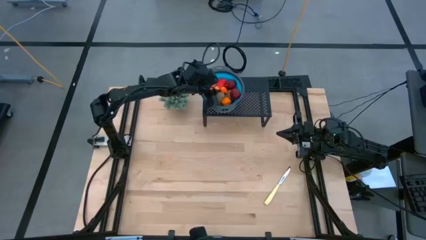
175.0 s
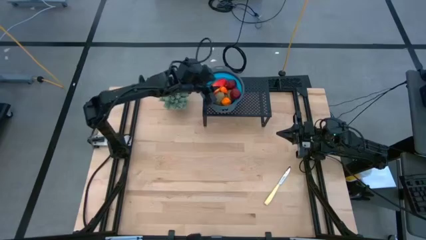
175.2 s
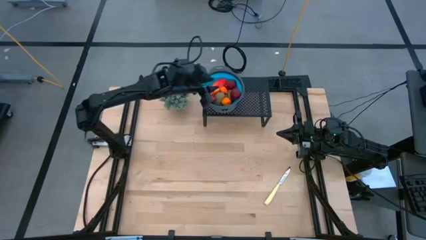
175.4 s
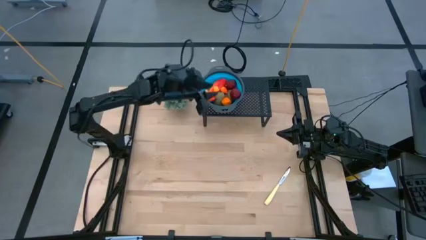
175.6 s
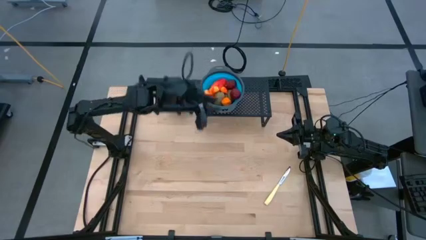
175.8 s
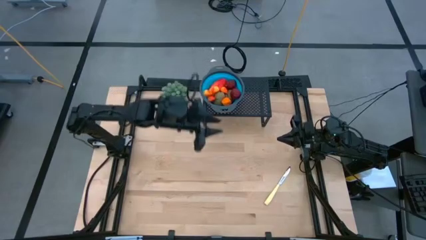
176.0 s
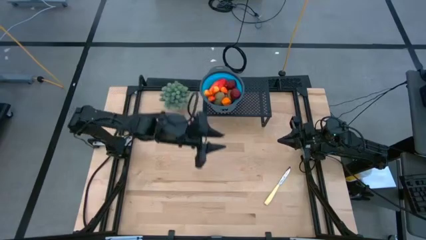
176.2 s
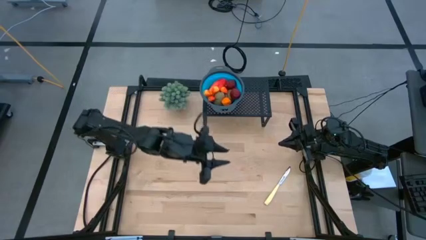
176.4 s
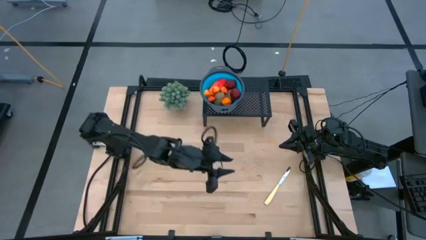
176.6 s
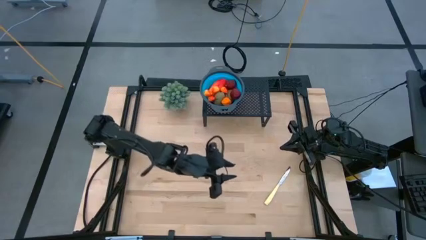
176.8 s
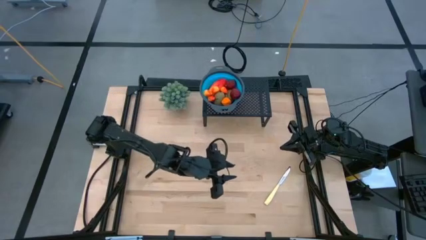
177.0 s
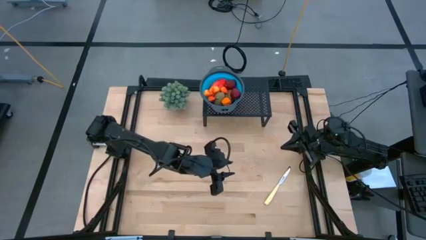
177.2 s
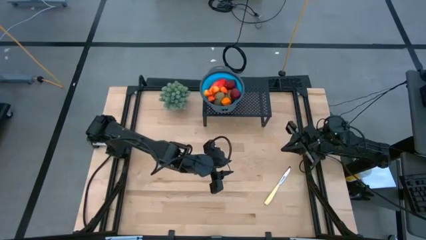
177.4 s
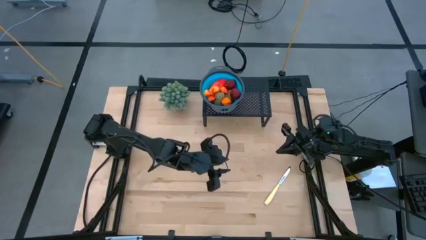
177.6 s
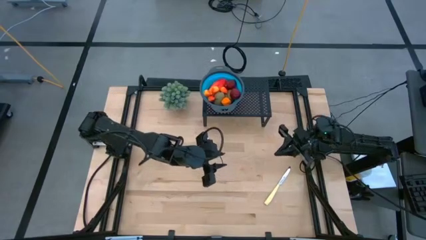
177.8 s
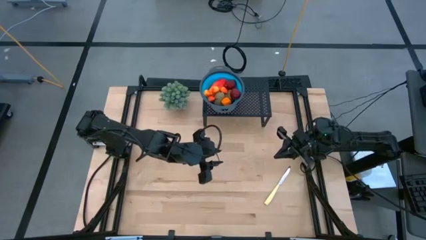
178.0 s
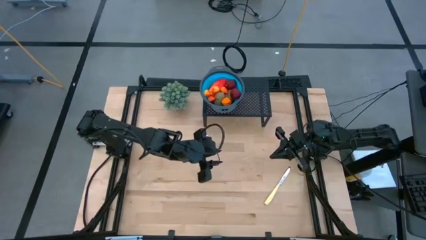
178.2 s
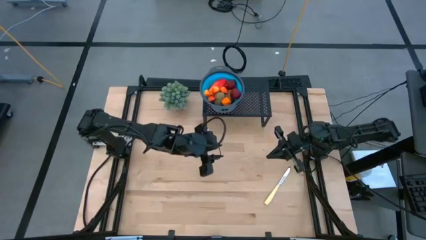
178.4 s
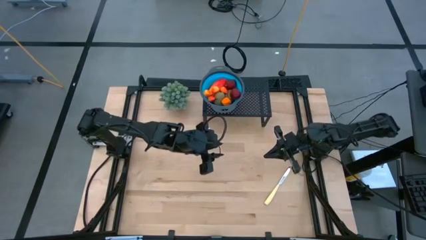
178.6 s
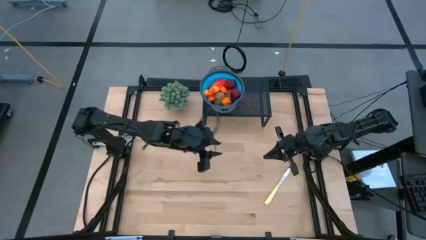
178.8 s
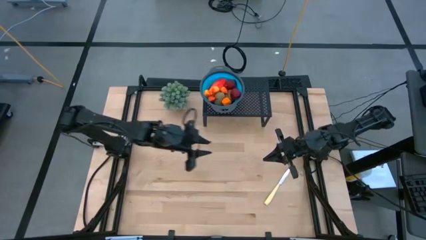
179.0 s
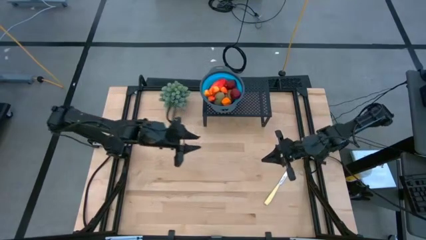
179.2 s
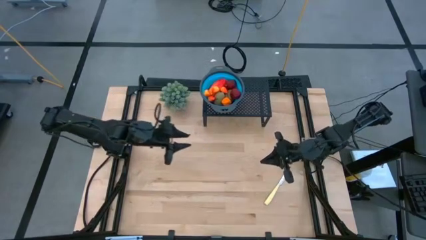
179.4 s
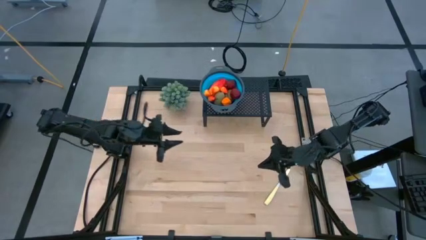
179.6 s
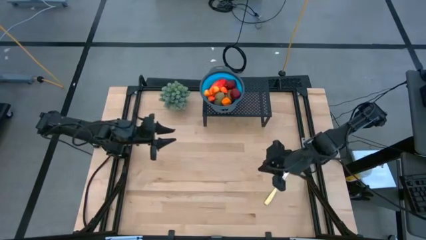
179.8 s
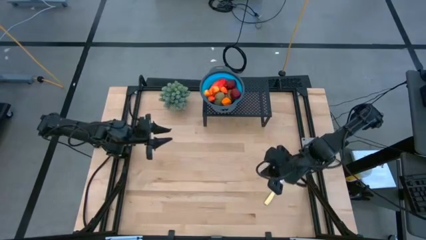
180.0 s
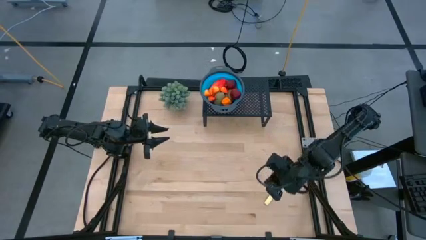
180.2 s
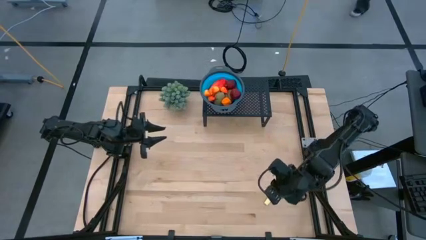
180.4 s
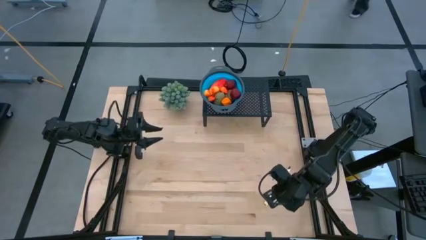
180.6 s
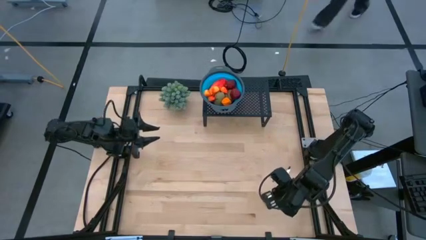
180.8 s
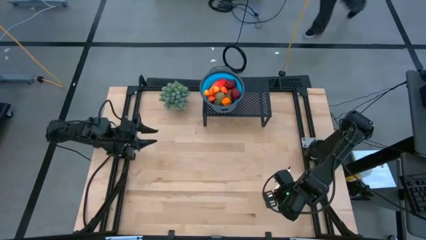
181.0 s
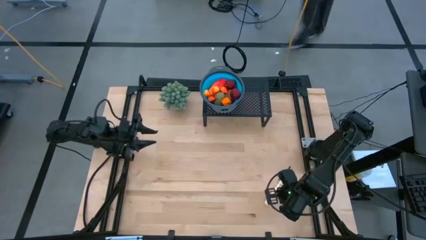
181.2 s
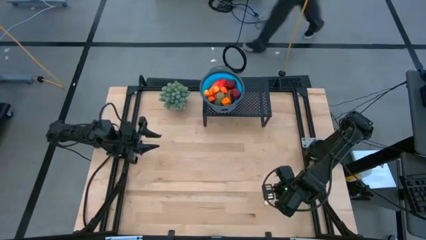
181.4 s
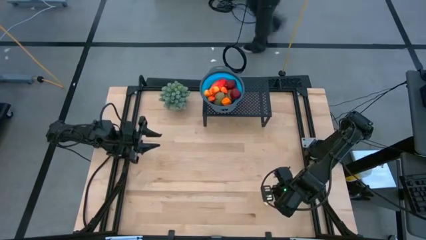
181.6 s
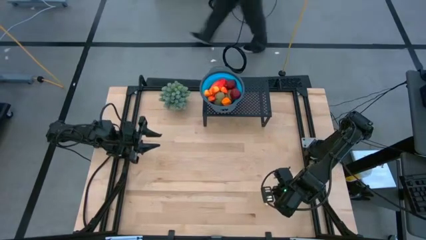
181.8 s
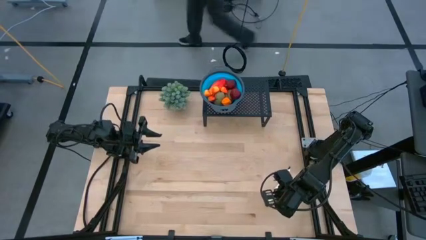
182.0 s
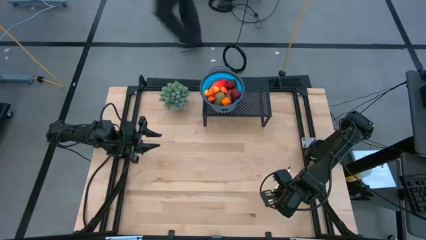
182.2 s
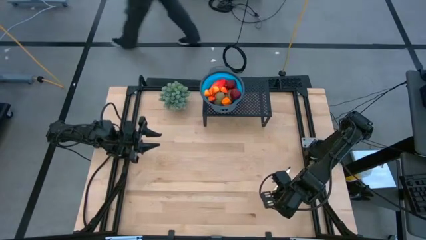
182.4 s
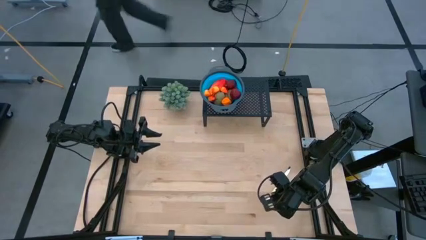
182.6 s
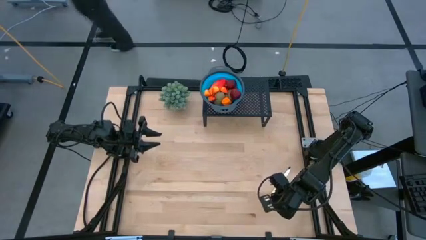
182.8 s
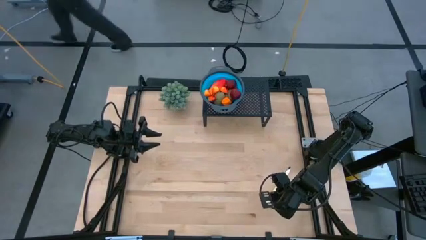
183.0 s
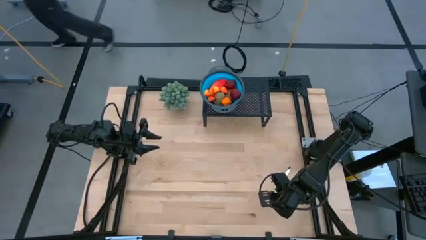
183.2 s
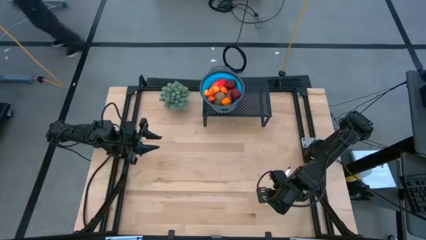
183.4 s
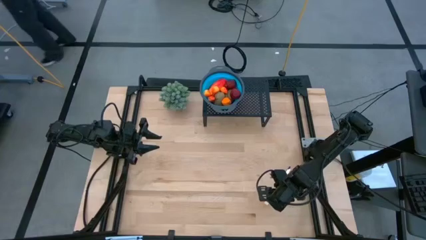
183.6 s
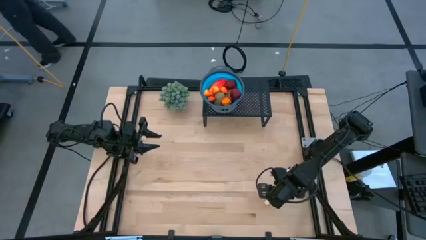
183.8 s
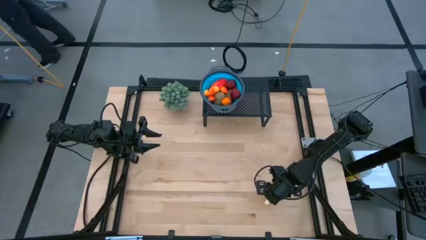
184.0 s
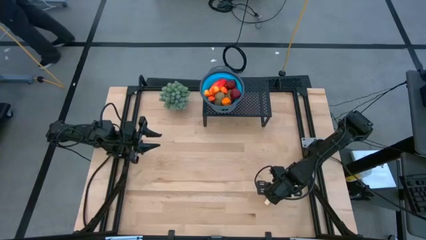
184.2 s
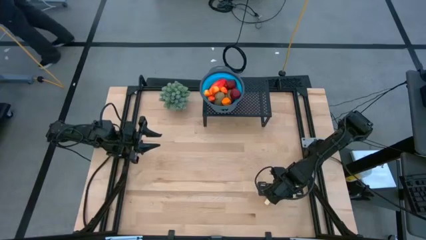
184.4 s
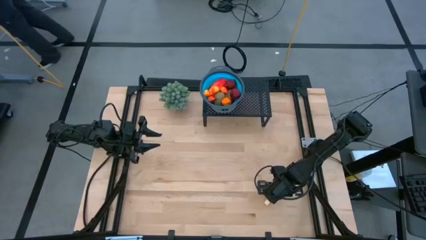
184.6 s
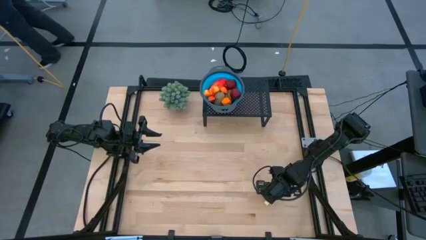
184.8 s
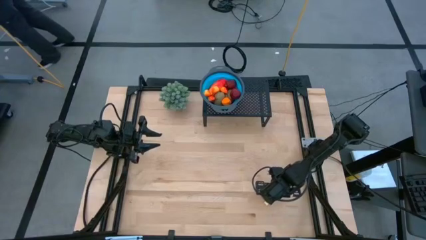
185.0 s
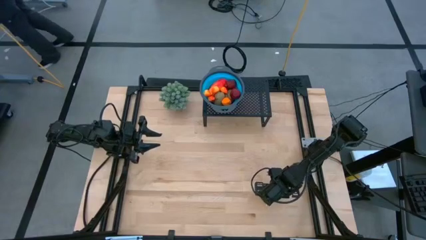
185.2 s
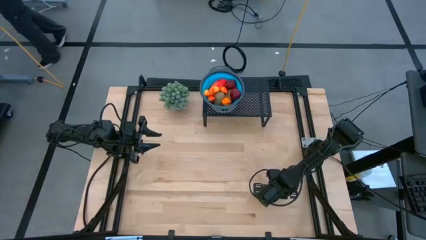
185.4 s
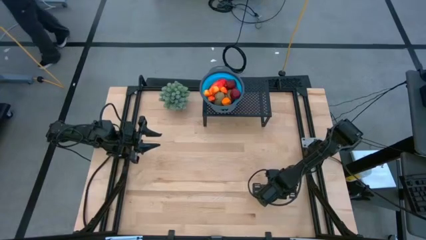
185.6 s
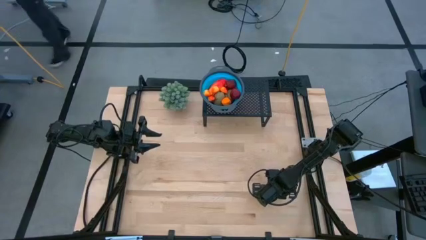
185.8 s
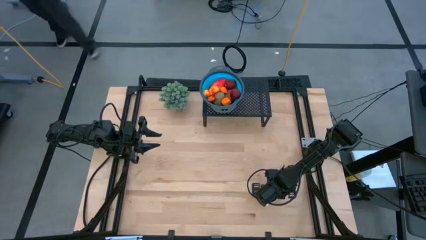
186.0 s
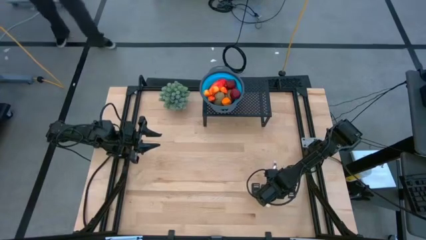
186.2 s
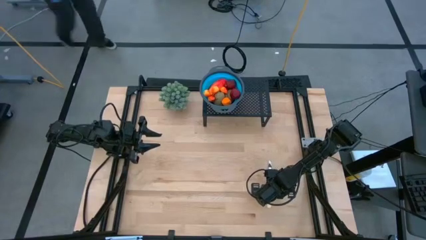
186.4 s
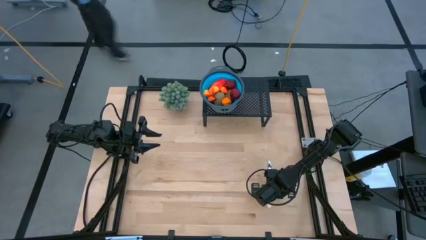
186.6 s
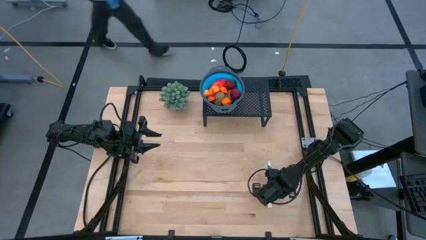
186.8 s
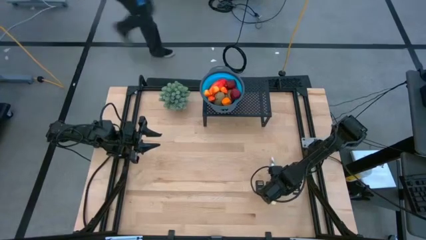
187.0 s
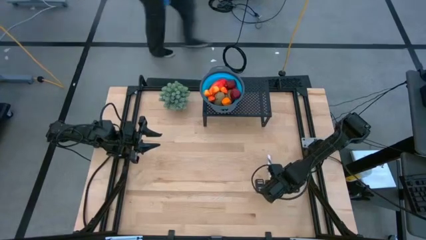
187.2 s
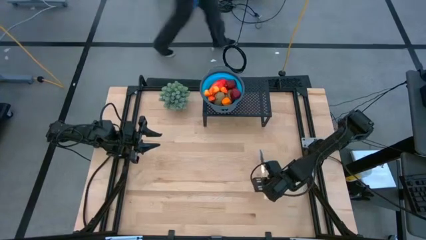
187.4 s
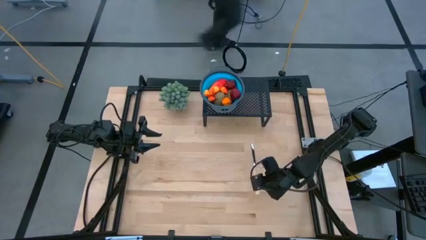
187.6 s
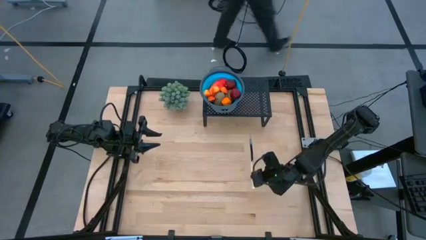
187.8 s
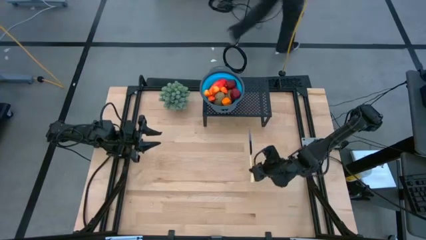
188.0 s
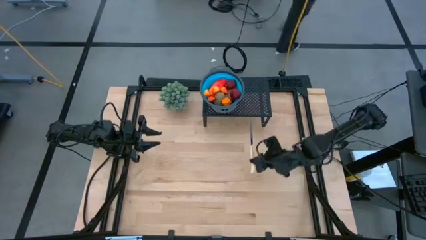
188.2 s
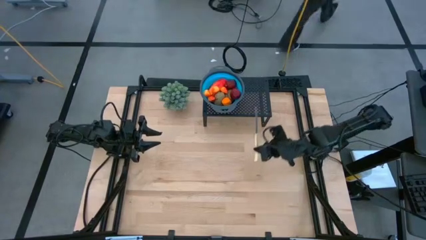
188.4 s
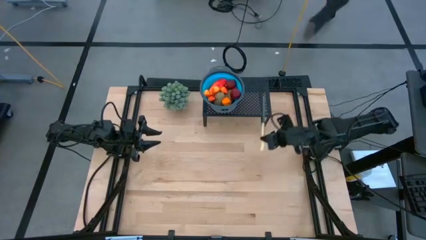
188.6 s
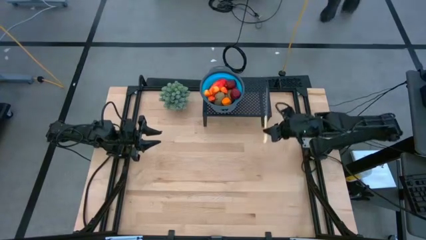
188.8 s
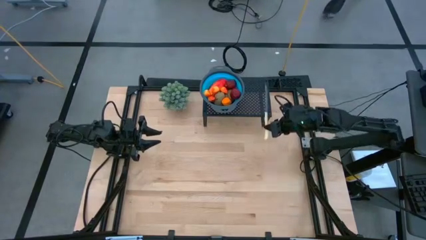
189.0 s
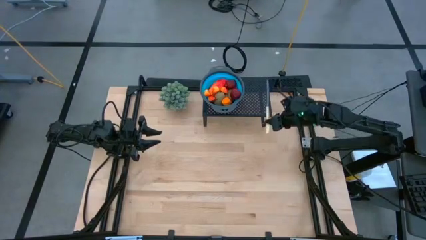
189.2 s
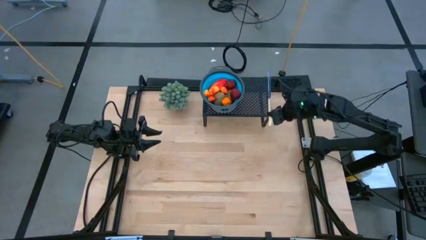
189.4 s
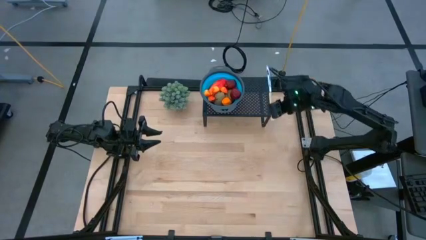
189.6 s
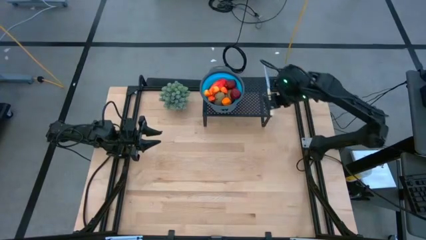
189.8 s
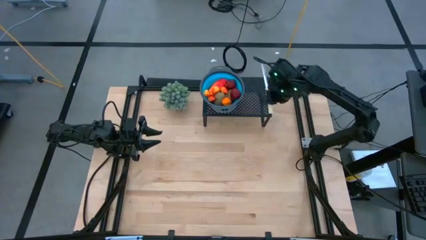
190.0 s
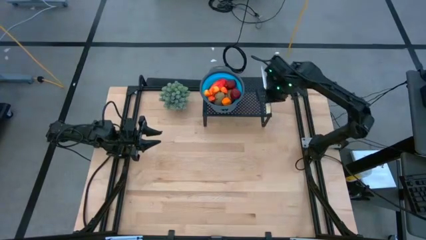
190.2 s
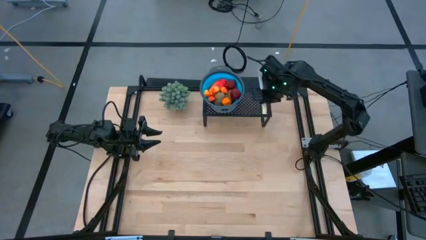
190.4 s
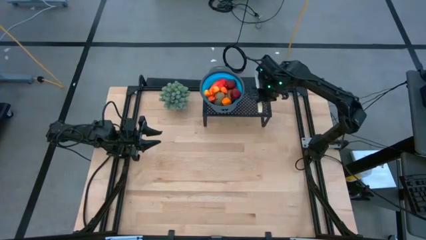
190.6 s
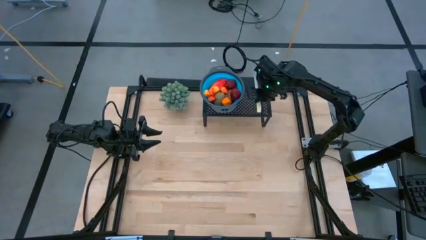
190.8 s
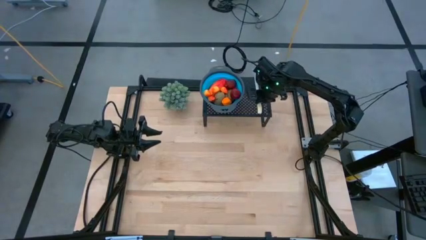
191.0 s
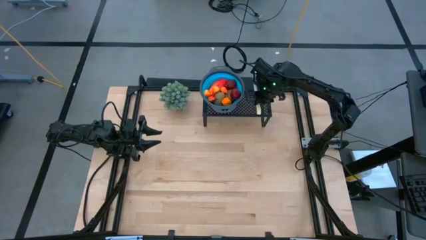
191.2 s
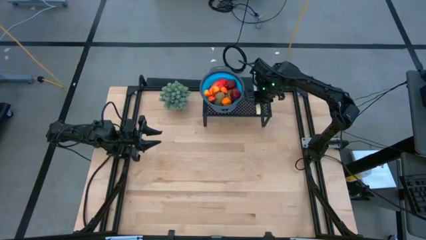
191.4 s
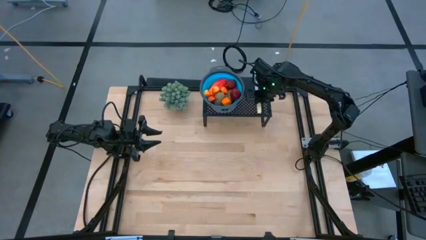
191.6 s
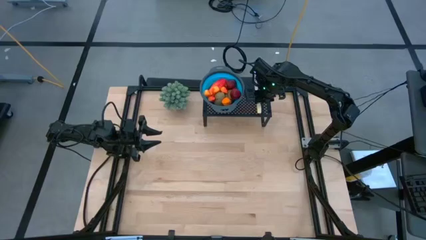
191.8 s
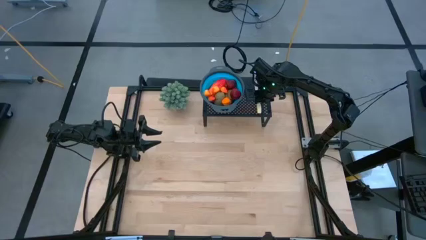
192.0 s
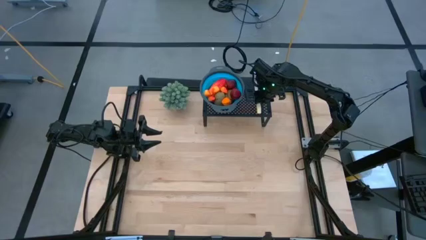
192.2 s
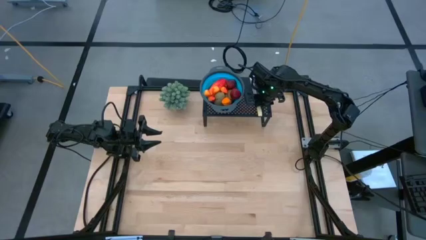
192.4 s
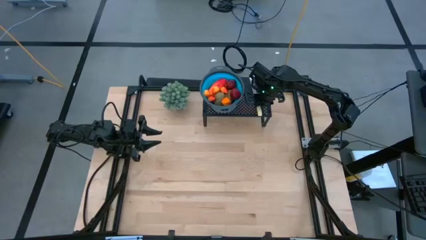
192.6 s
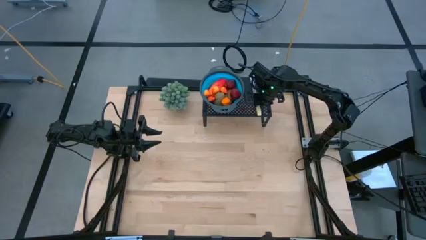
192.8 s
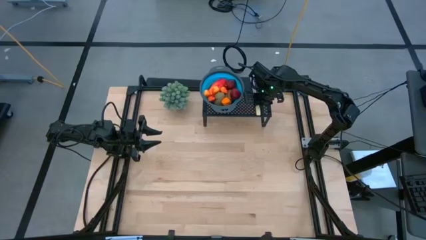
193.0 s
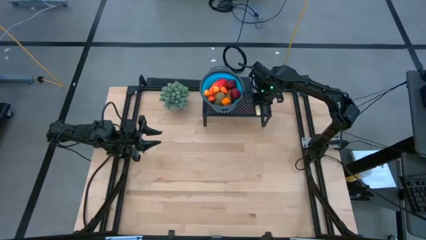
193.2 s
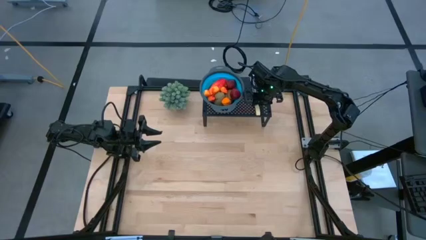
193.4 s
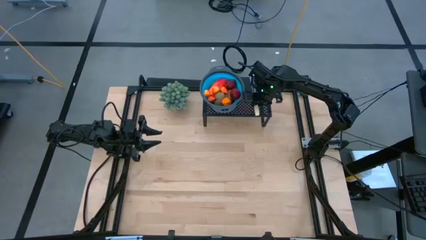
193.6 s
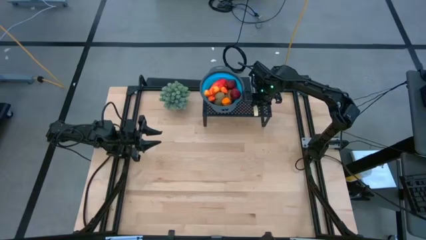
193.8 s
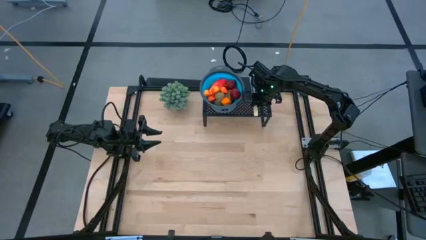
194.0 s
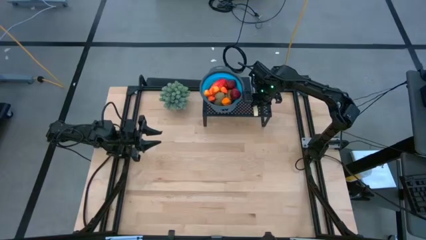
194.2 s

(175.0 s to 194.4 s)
Task: Pick & Place Fruit
Put the yellow table knife on the shelf
